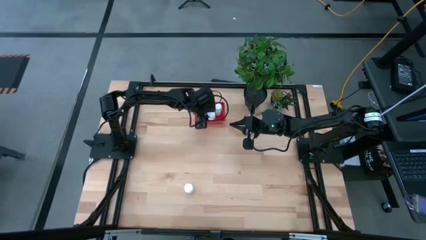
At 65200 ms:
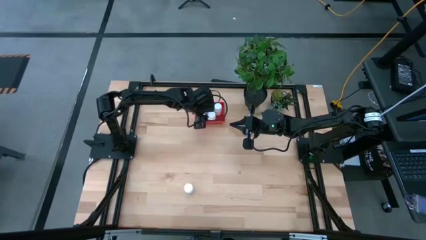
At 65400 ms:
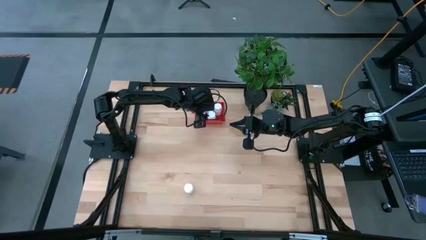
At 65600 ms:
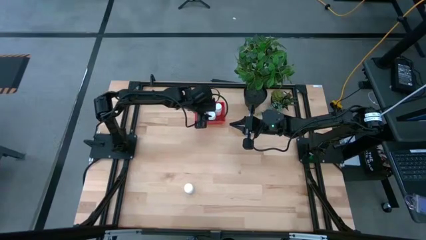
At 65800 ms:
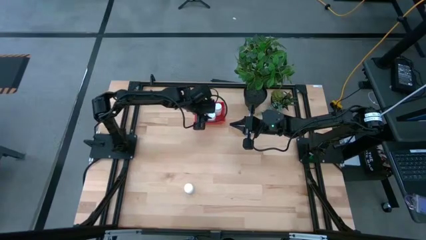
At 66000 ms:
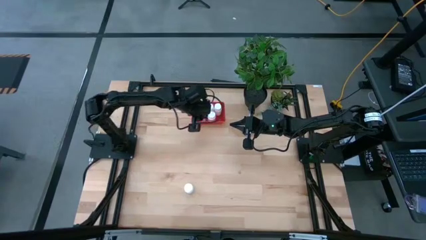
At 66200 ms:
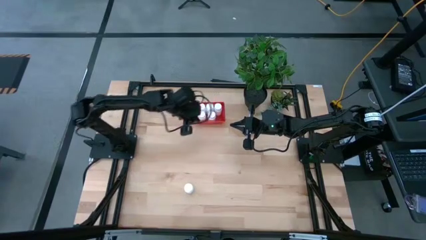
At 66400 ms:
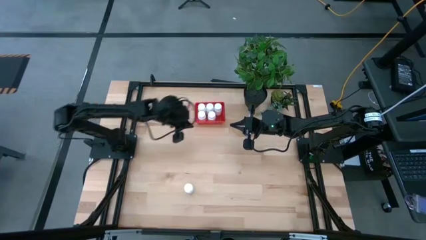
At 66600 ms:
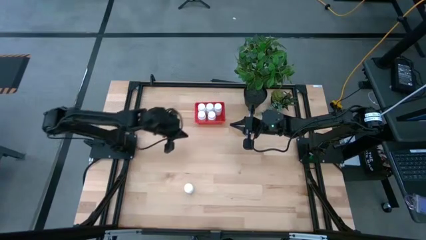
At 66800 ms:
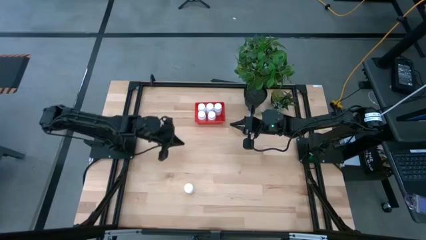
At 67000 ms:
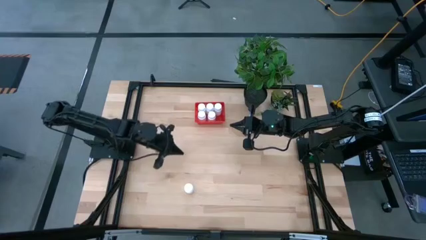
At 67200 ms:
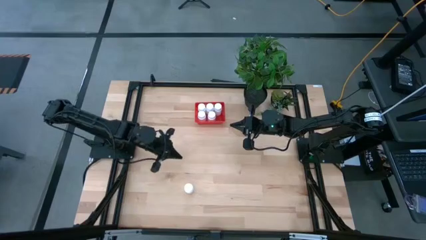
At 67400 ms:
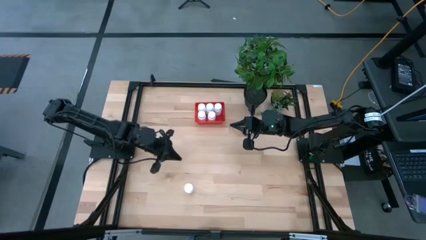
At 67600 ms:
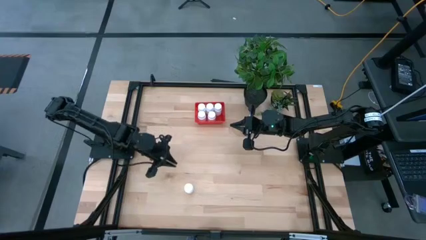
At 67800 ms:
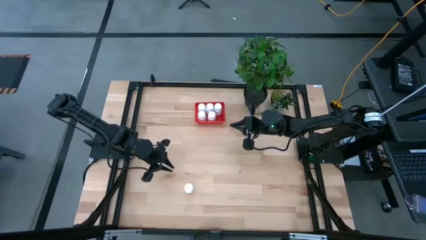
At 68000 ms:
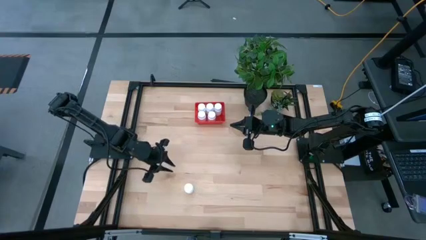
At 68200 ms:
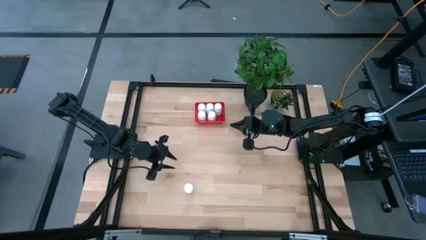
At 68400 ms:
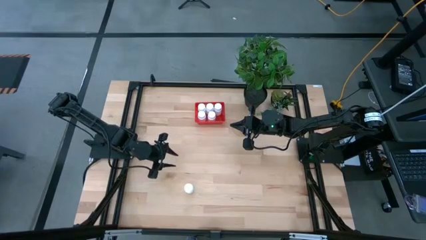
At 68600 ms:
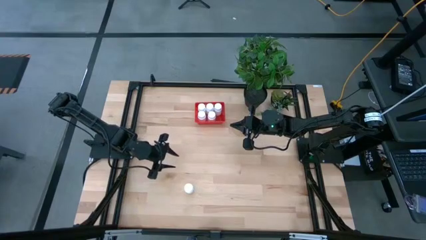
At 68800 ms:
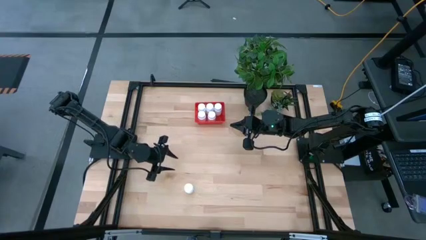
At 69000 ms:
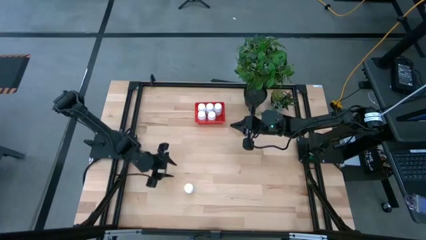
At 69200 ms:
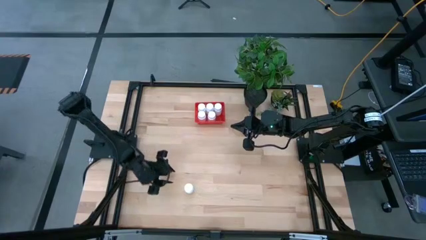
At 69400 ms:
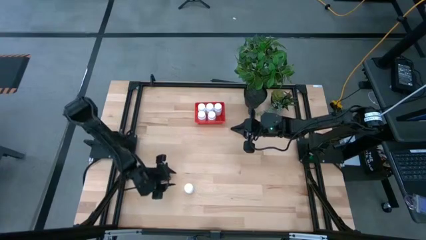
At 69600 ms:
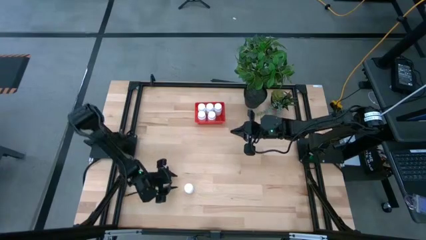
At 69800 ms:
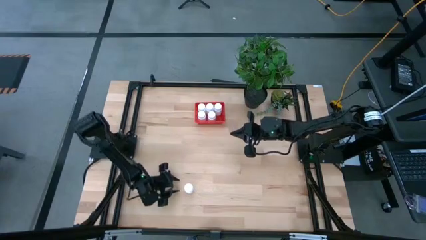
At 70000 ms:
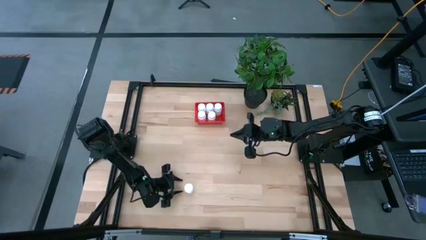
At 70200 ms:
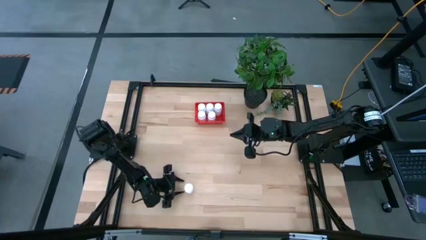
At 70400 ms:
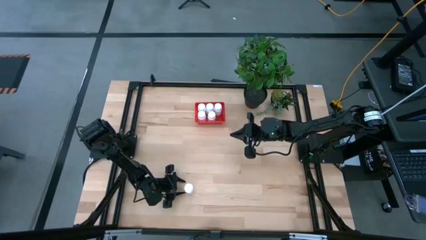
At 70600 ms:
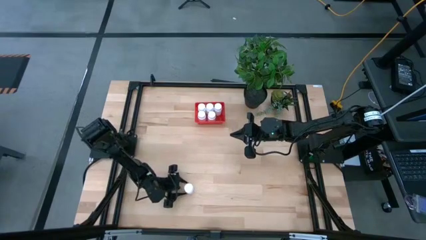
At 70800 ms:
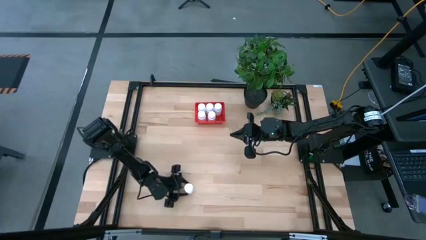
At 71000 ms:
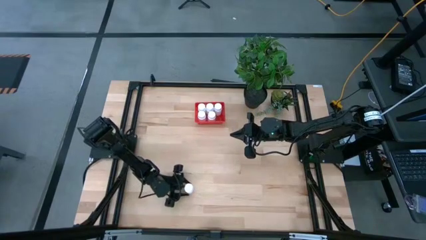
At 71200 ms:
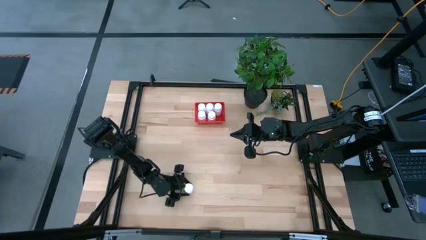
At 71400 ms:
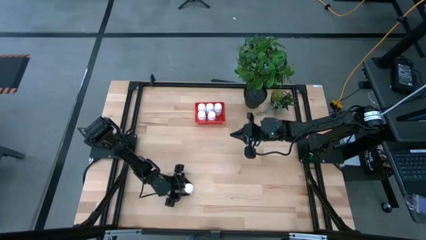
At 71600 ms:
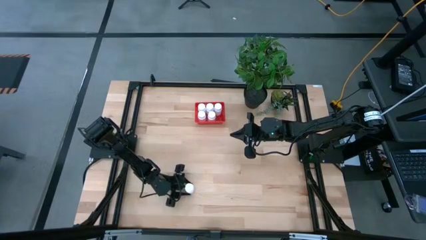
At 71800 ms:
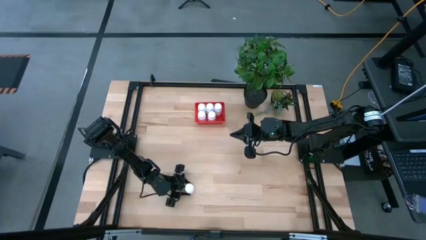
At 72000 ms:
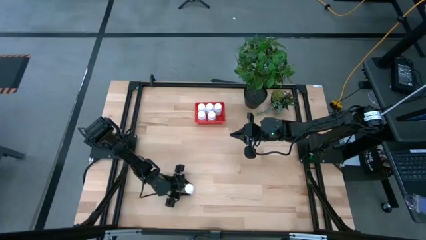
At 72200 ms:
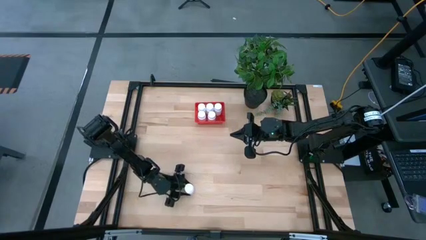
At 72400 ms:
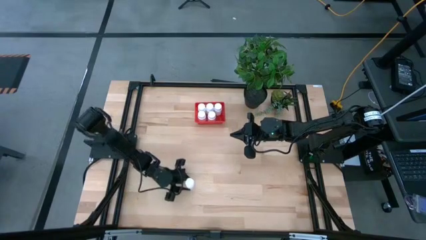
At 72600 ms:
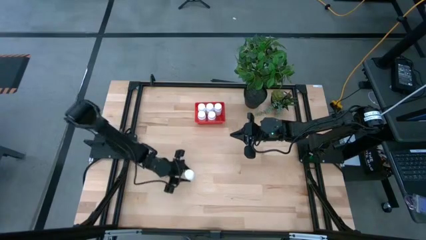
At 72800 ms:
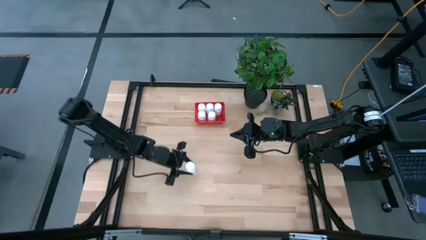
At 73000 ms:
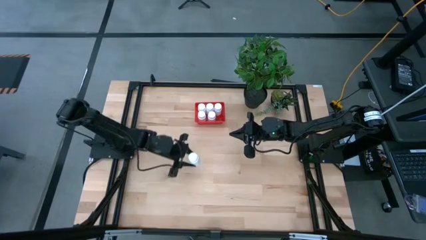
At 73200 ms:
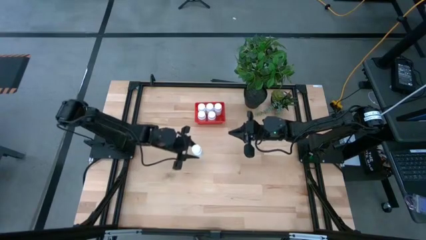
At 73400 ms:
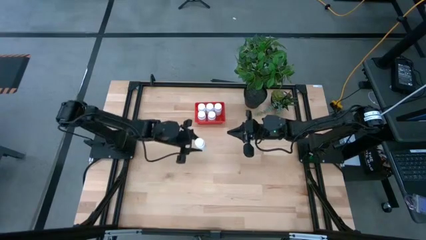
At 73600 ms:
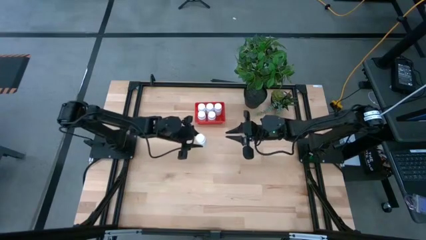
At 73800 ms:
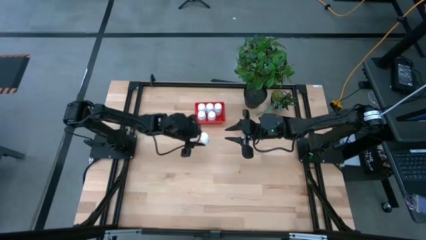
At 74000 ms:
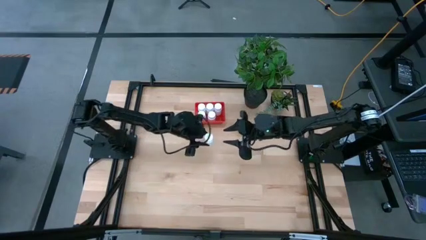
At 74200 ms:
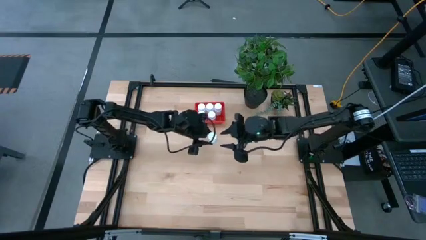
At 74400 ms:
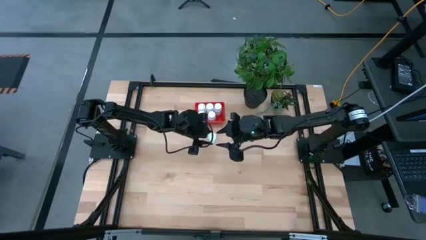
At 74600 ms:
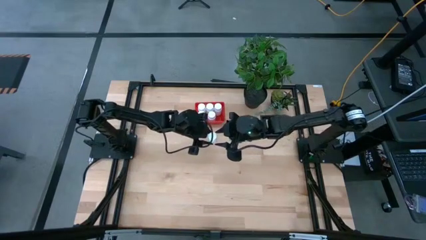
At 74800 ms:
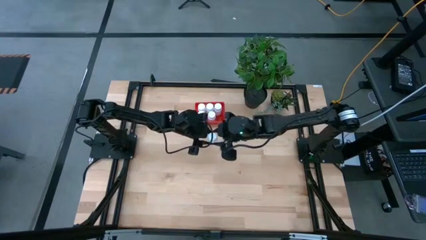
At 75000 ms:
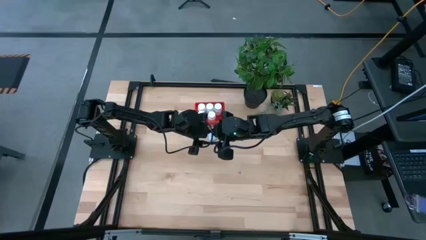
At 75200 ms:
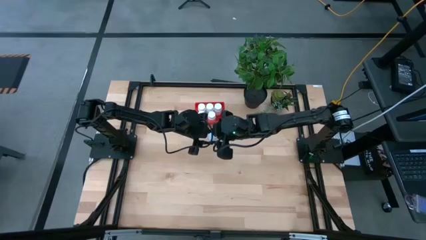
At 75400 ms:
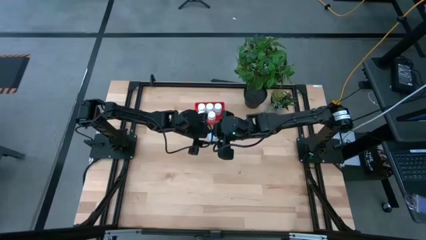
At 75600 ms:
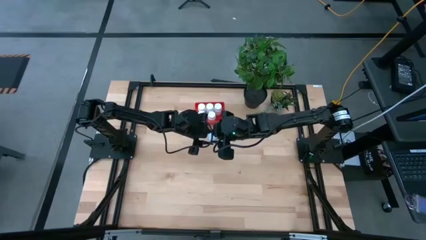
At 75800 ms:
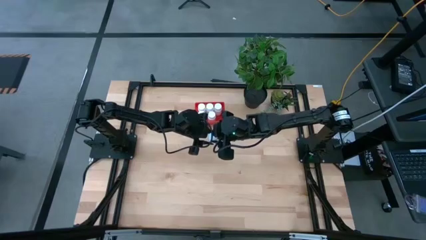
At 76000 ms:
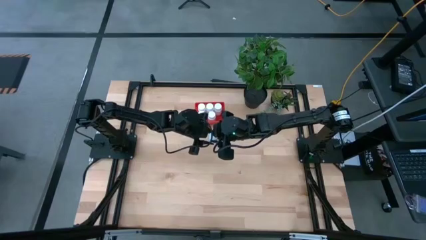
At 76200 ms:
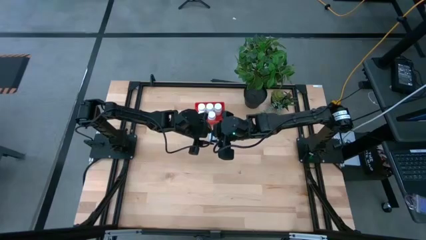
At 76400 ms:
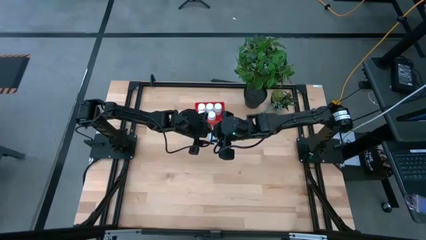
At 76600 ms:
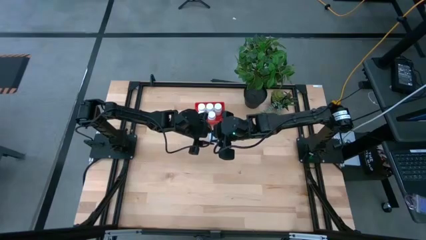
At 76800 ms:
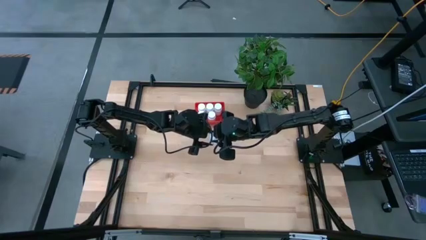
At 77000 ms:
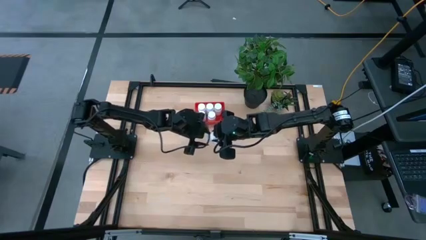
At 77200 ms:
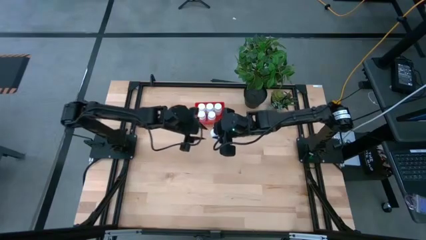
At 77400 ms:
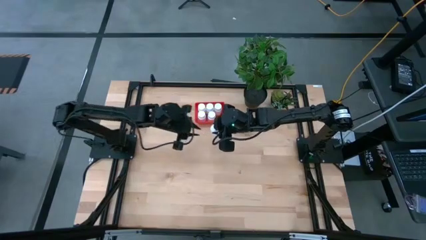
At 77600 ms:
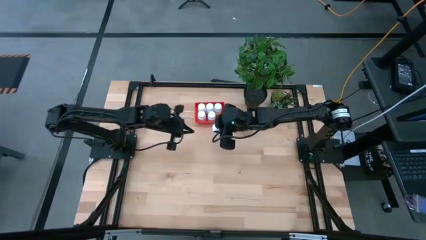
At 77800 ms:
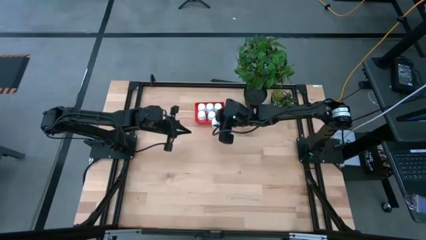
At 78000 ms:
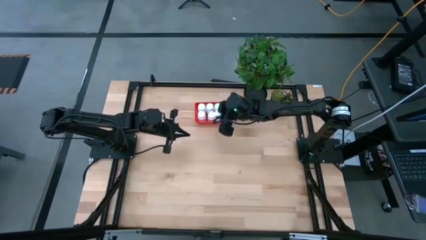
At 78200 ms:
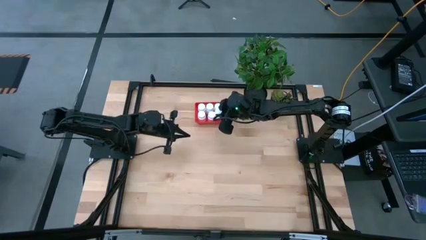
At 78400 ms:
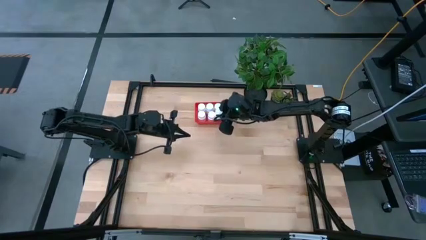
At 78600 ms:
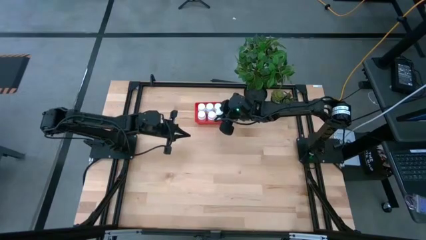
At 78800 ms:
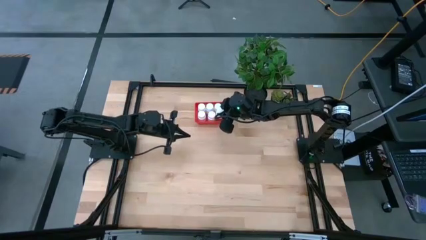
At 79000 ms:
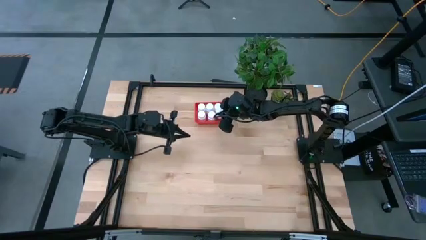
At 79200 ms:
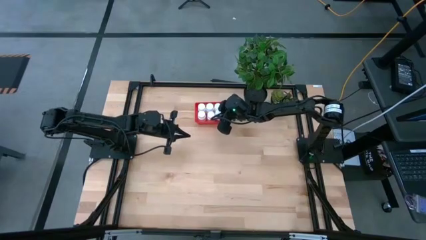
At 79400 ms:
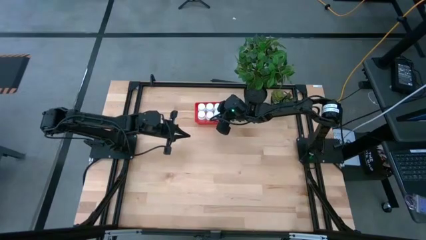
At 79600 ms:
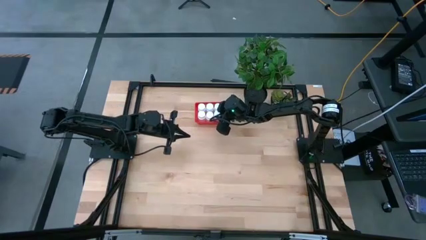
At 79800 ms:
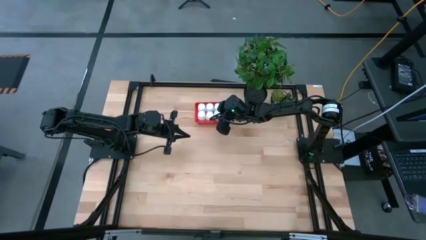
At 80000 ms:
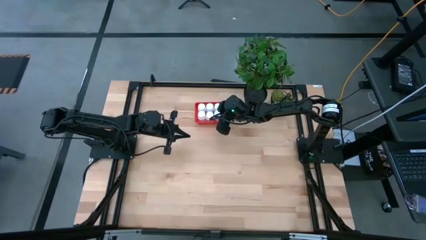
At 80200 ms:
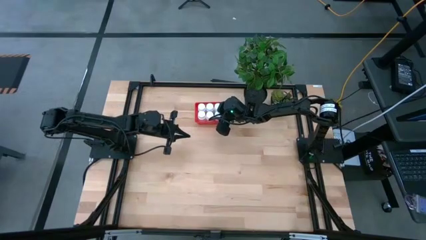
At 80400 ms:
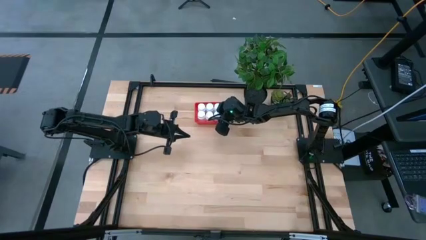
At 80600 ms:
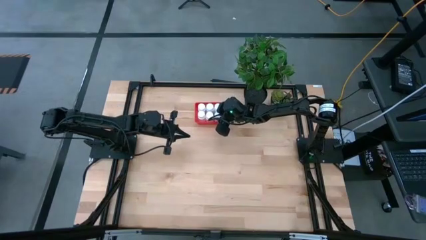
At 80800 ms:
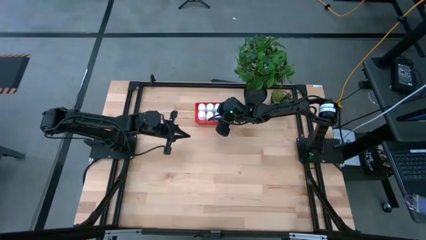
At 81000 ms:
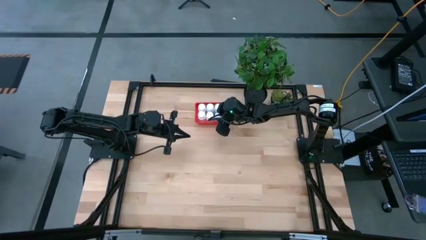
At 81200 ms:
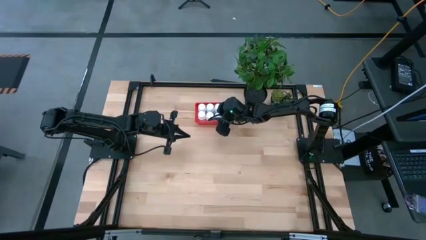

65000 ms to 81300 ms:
Task: Pick and place pill bottles into a basket
Put the white pill bottle into the red bin
